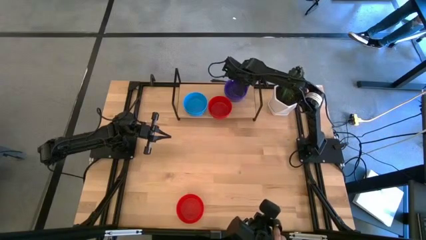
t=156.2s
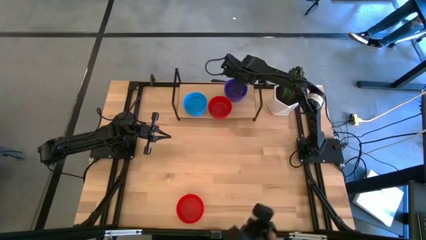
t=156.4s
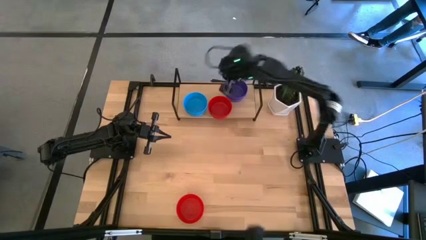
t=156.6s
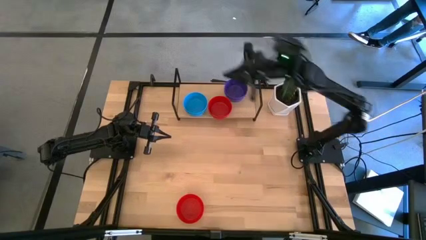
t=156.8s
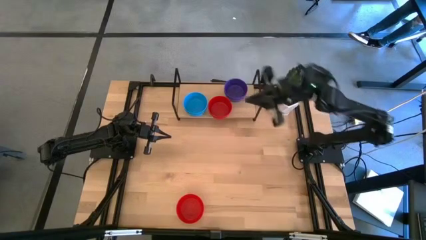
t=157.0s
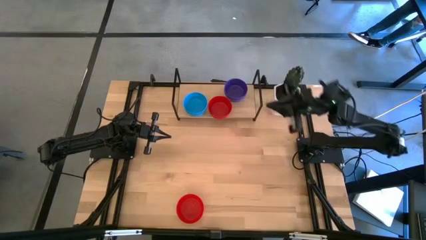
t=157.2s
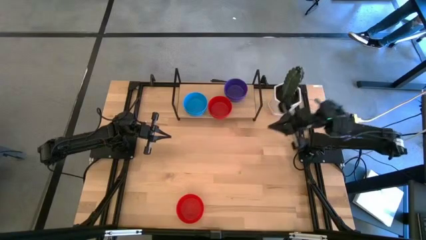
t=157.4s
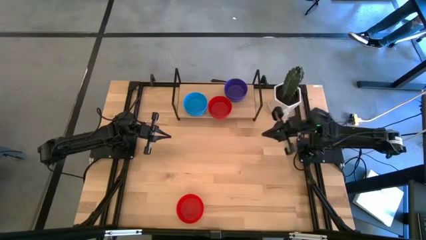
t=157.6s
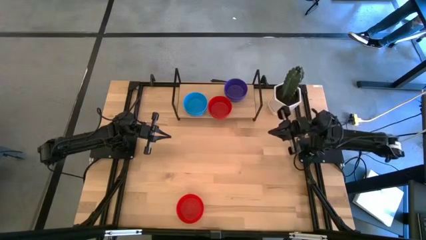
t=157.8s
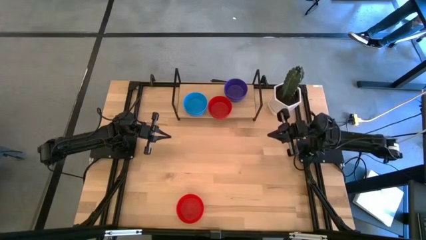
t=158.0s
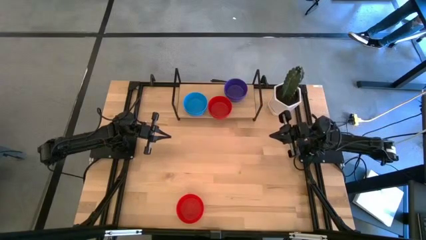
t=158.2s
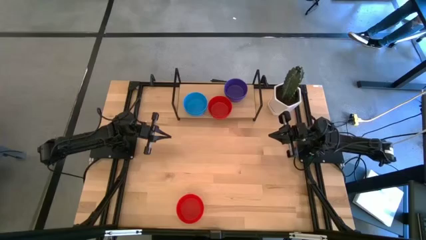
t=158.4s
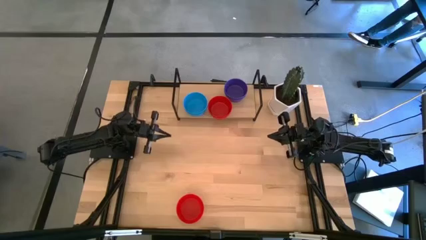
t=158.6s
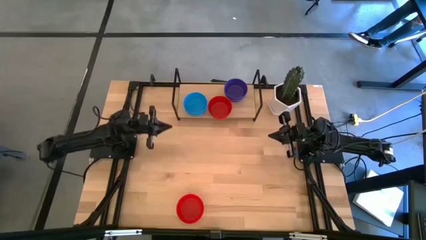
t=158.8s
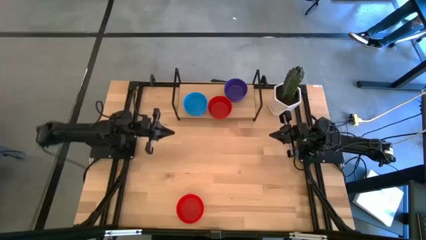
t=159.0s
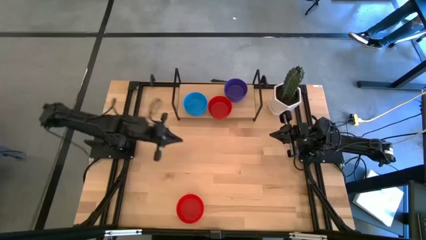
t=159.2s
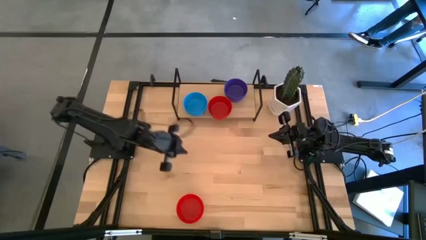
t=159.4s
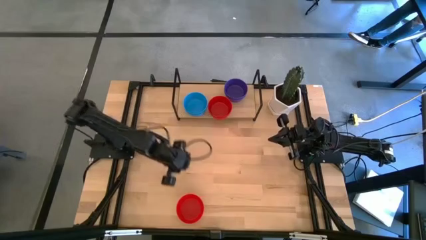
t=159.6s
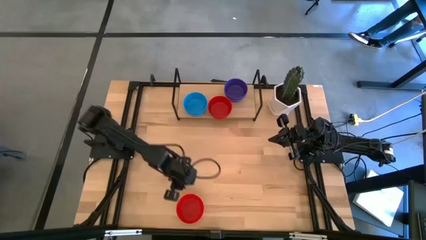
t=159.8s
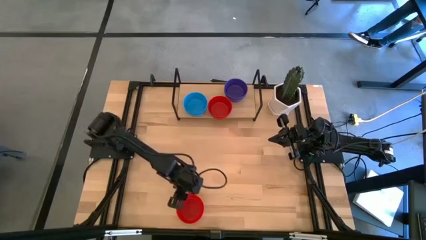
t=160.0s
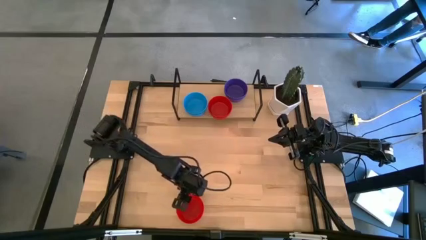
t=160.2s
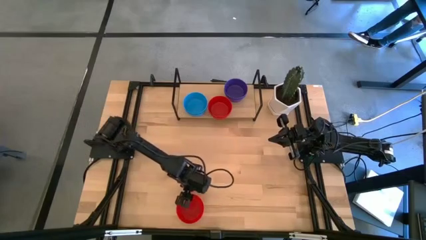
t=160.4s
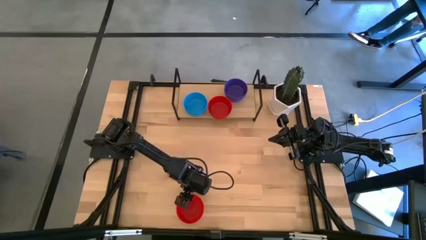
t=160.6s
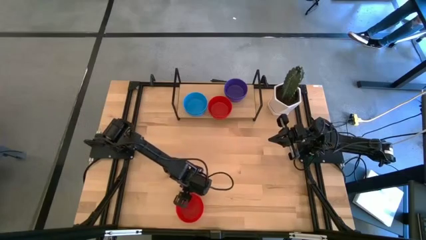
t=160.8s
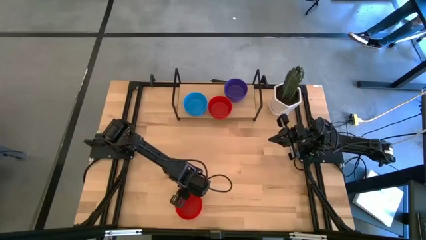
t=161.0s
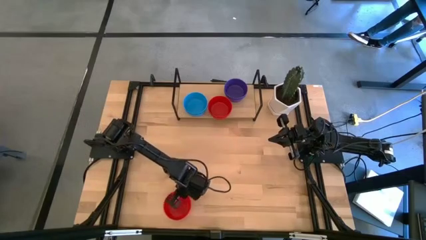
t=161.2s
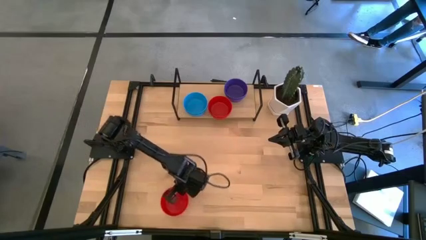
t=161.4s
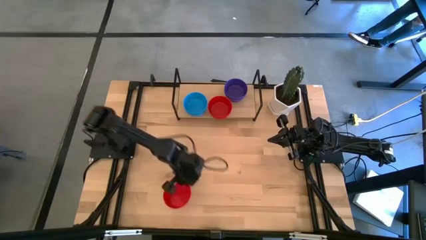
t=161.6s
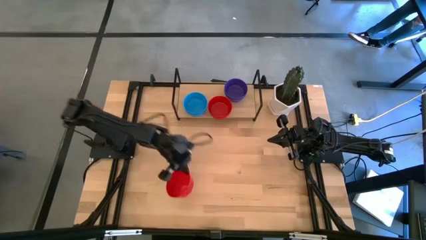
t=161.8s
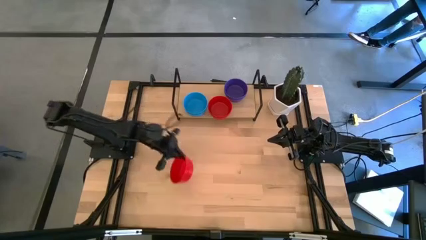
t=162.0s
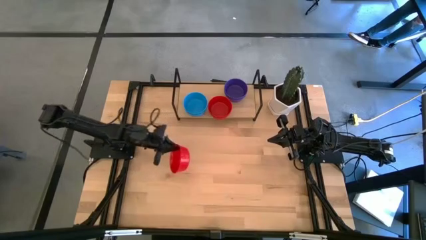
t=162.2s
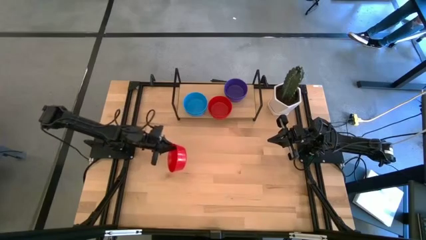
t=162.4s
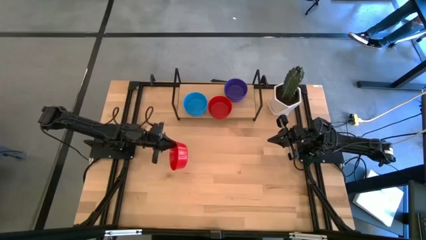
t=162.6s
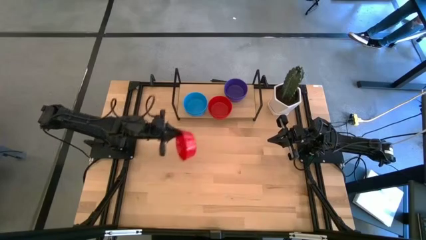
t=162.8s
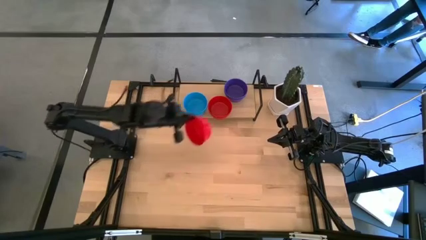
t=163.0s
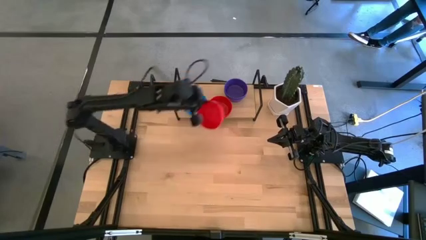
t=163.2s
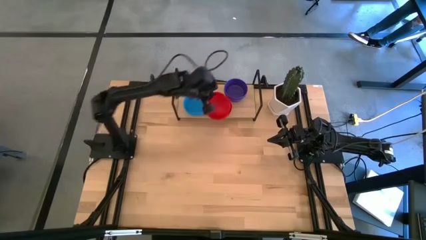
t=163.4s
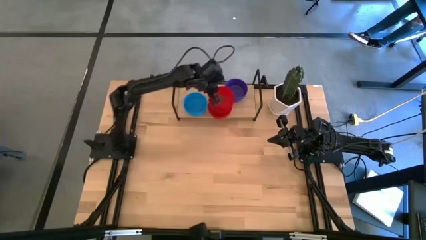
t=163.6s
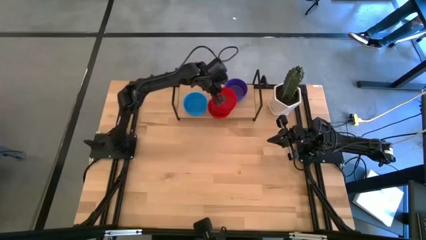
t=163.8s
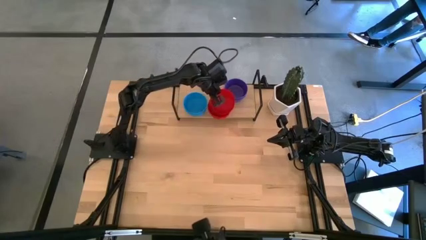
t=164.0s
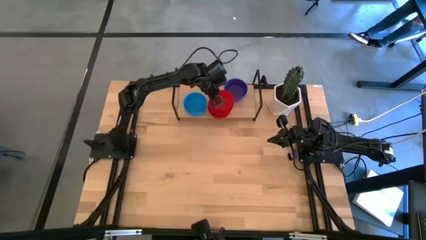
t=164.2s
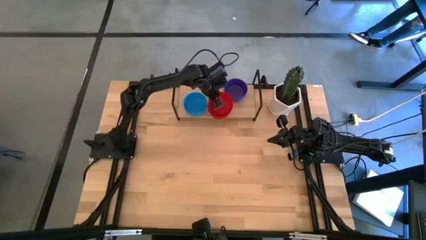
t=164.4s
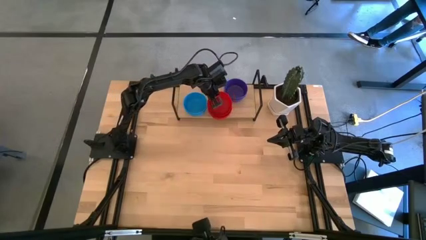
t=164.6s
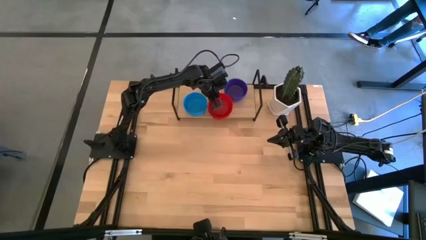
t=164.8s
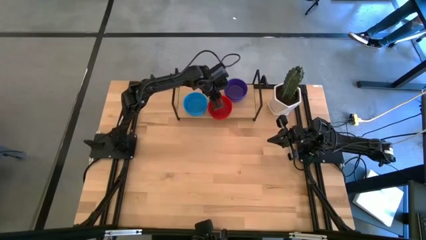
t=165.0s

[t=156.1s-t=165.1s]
Task: Pick & Place Mini bowls
Stack the red bowl on the red bowl on the shelf

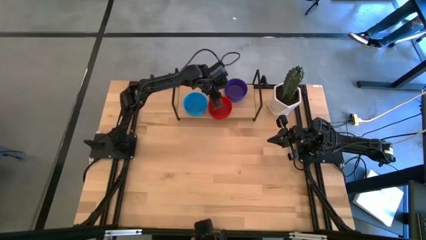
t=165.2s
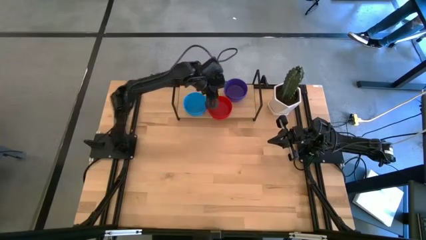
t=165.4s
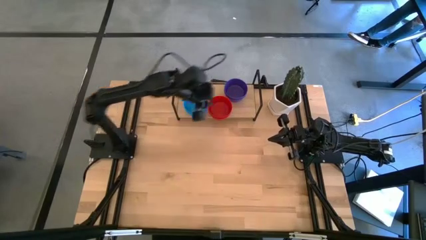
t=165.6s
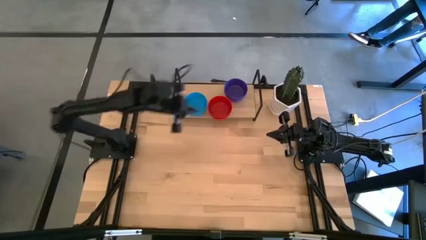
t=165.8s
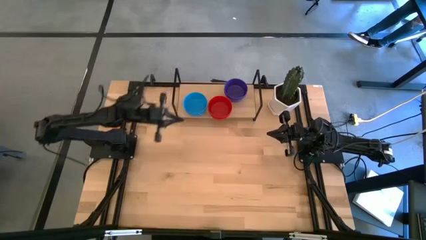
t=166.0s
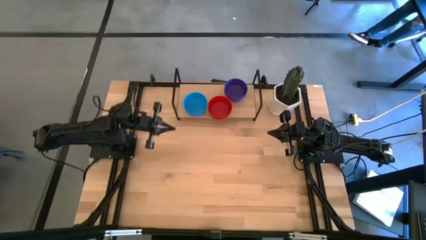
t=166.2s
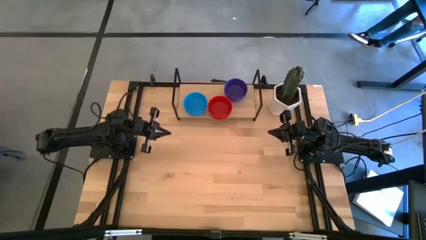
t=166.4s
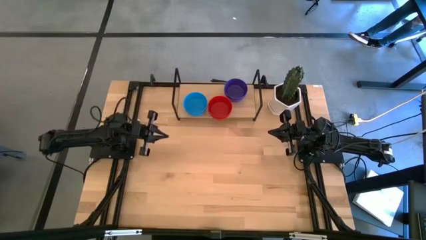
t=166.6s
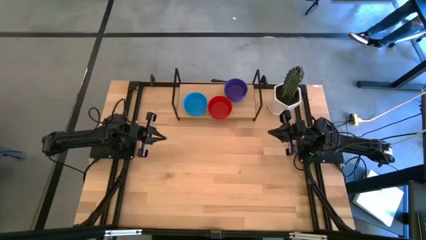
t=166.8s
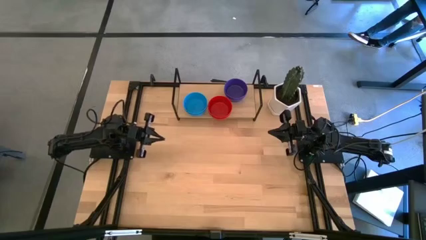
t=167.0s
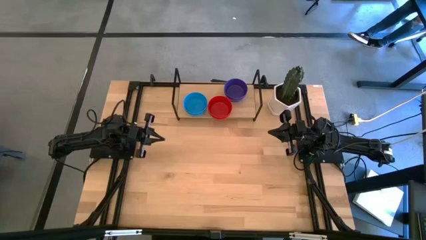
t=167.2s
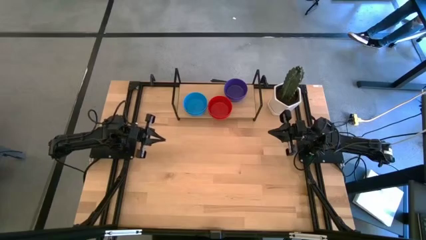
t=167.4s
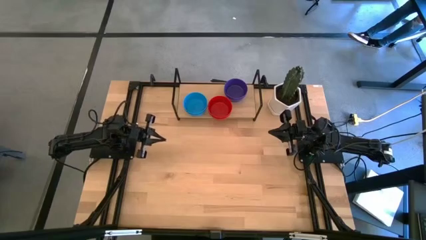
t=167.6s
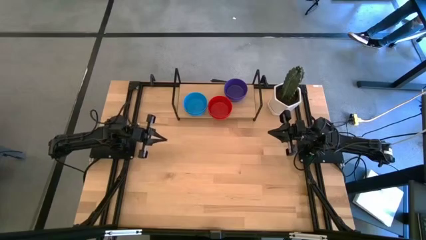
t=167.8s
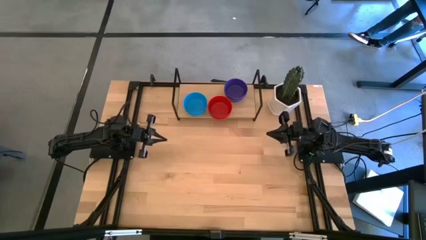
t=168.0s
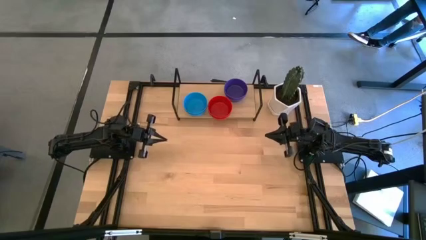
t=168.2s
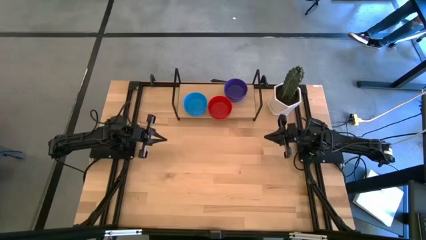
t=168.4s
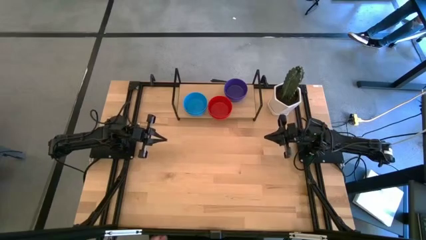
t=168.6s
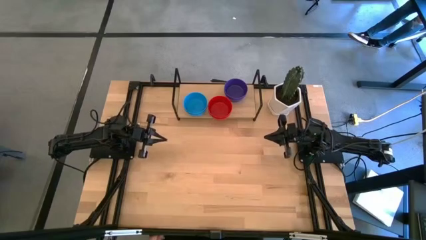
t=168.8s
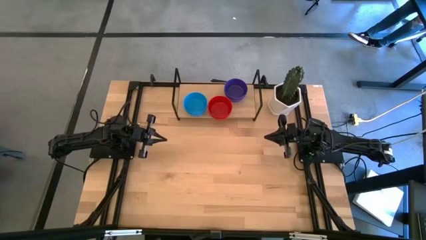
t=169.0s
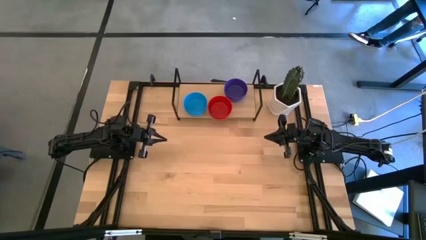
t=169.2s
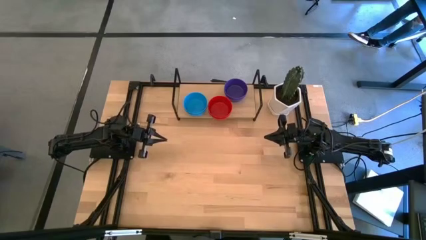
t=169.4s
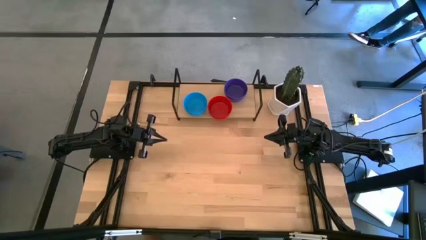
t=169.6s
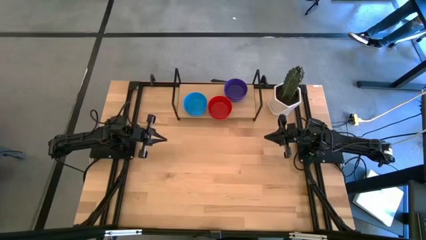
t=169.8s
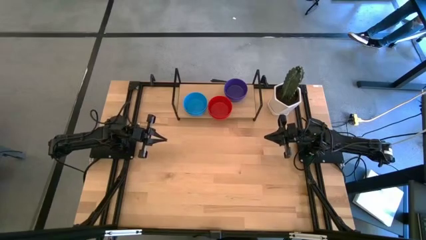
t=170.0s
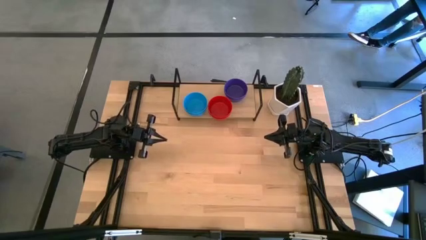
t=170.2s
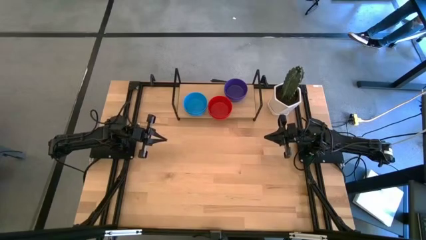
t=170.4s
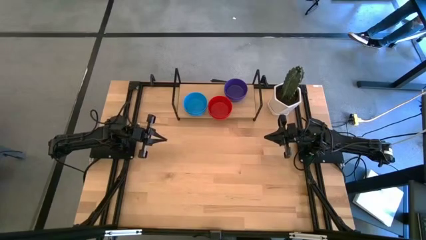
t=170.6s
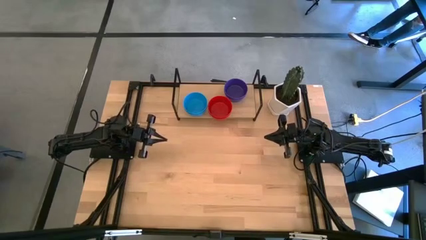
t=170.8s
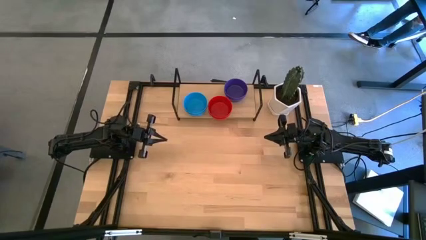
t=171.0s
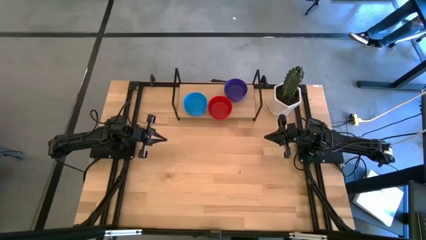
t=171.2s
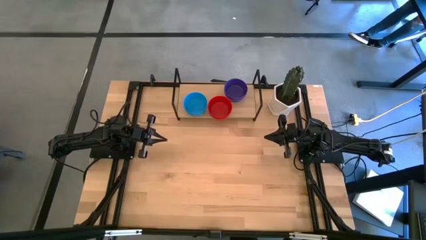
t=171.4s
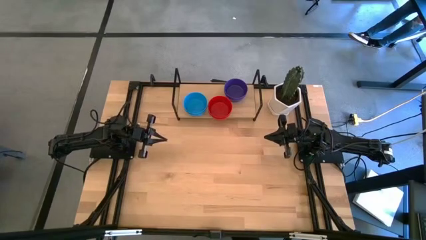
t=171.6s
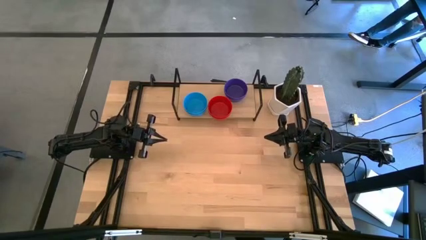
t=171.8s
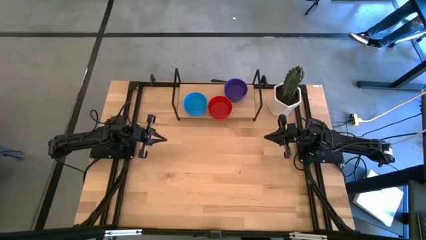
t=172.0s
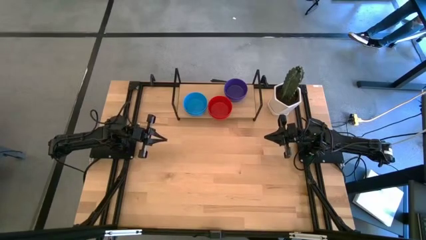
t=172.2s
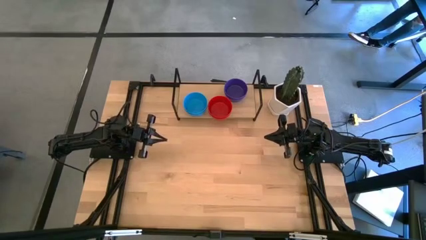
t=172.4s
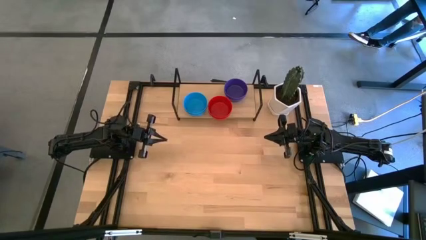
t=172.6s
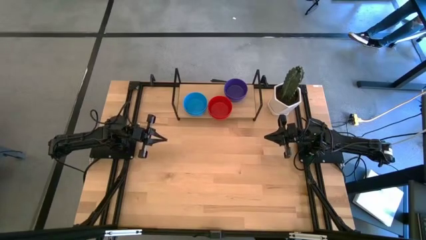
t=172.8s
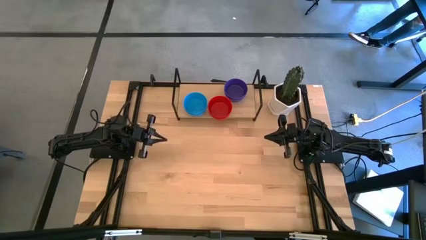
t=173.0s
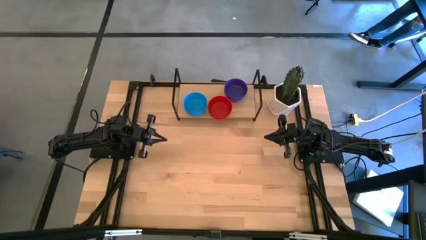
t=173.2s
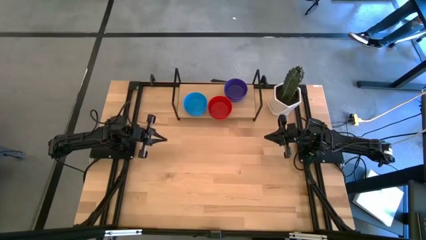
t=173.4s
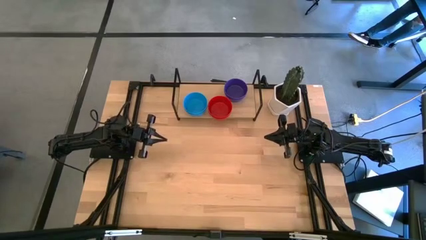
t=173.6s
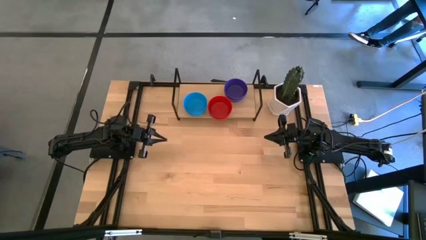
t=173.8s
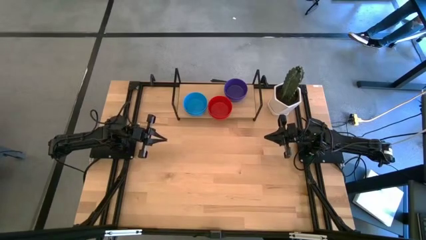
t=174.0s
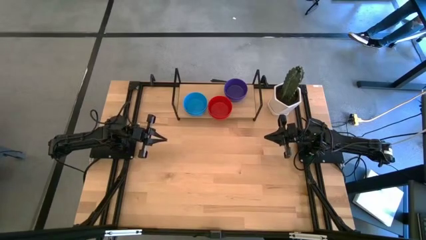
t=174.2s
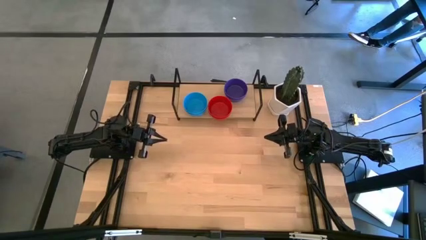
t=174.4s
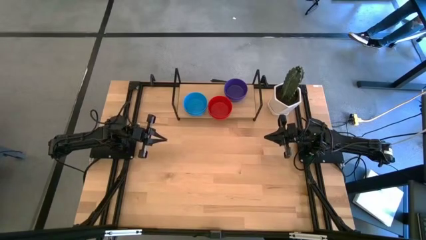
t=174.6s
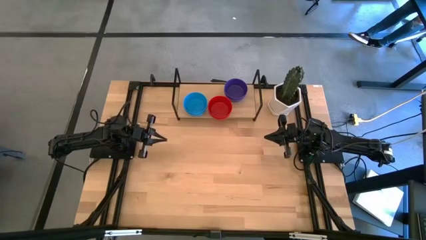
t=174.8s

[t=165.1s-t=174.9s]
Return to Home Position
